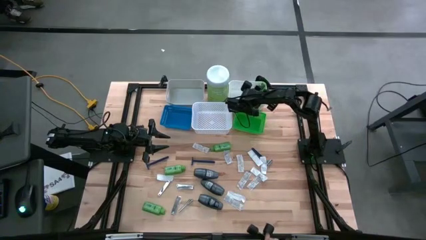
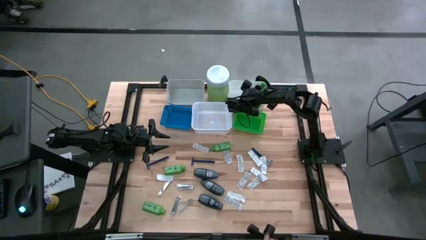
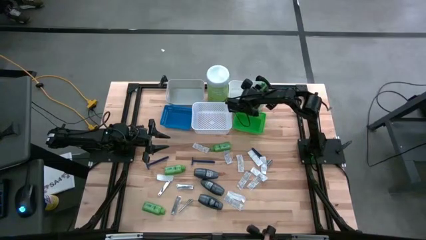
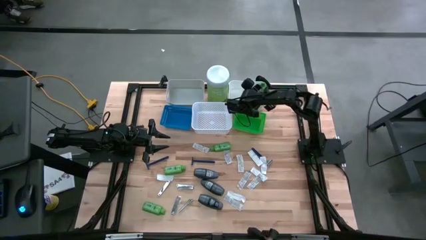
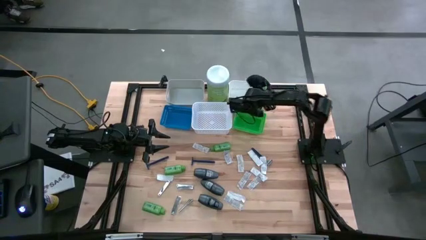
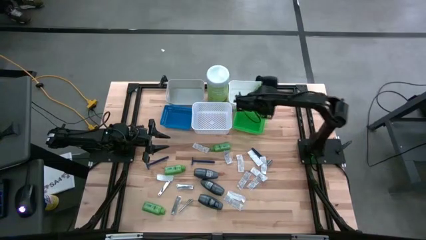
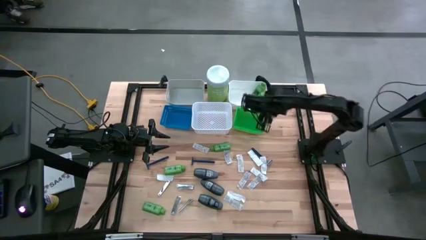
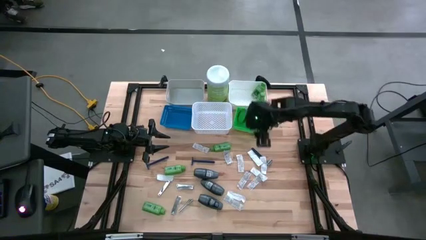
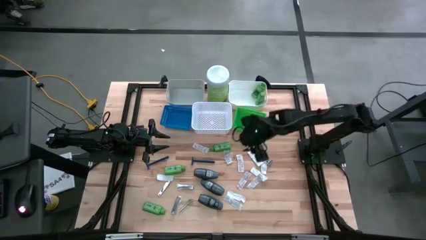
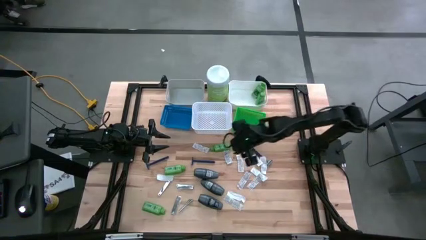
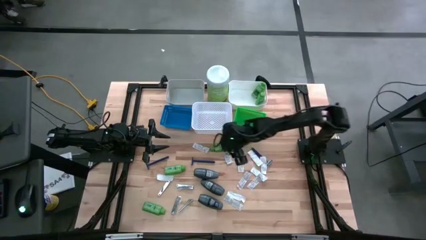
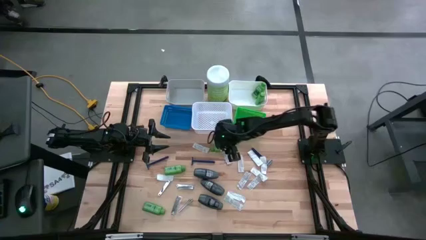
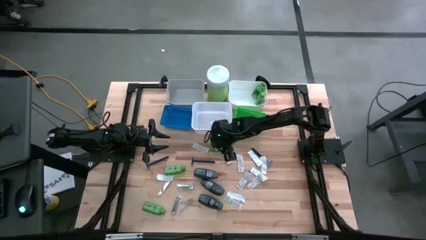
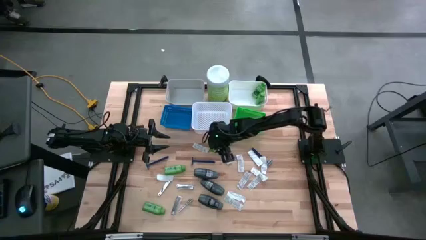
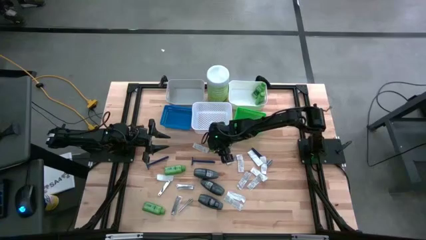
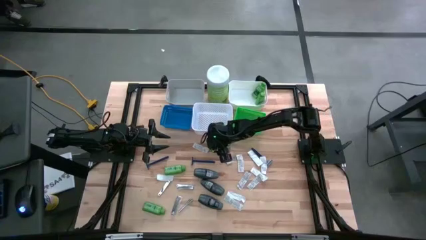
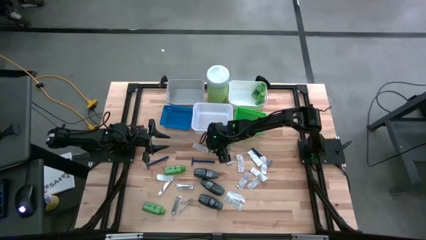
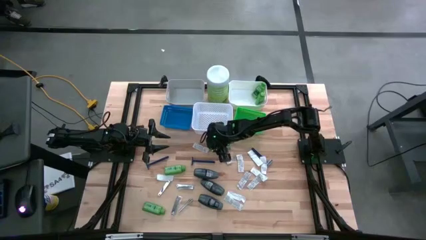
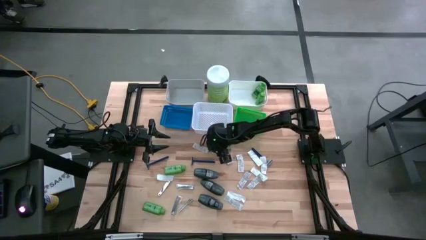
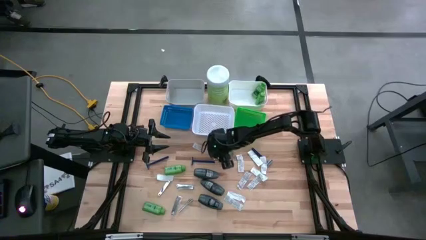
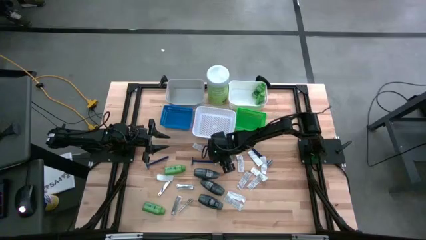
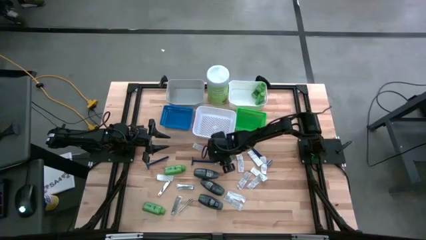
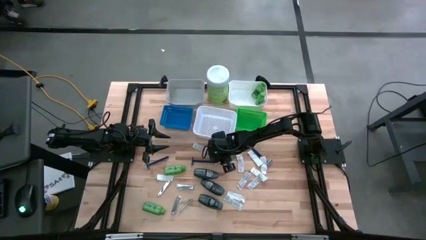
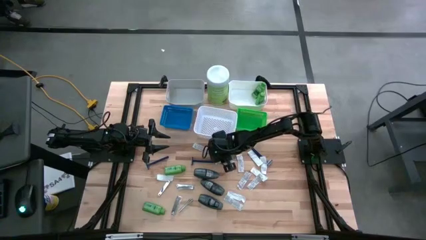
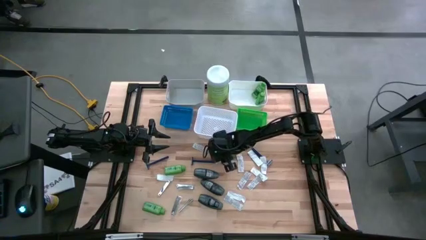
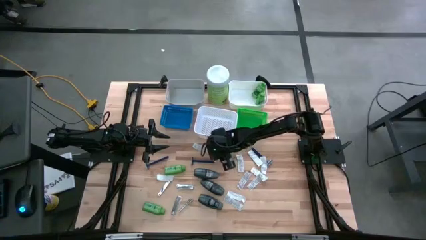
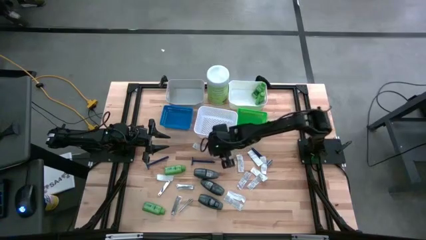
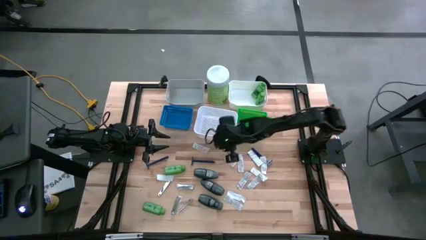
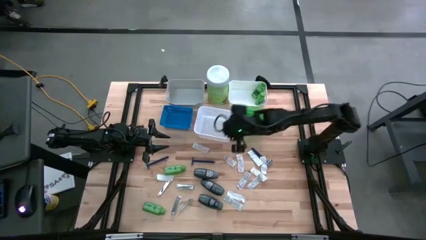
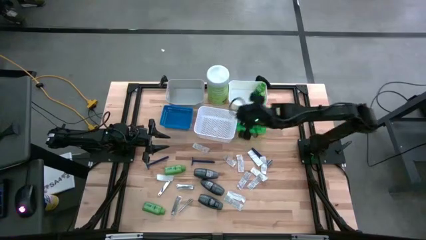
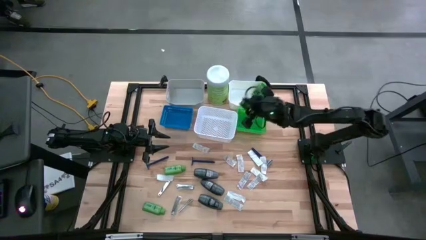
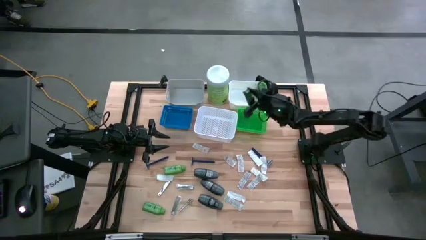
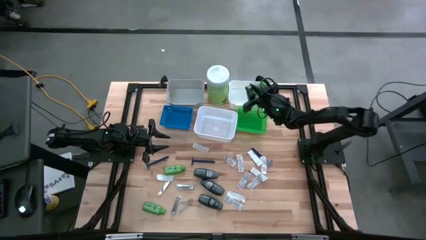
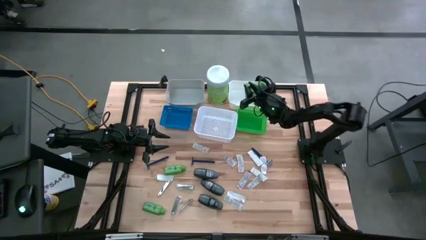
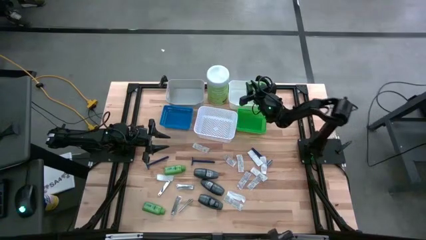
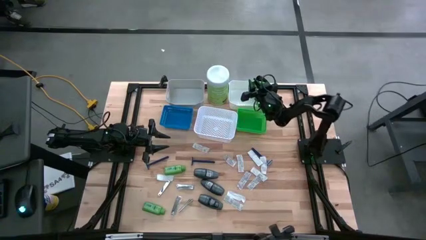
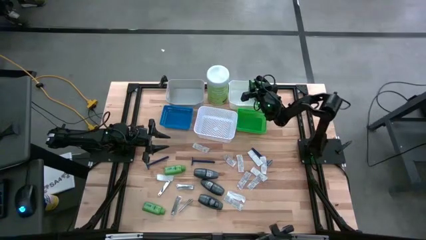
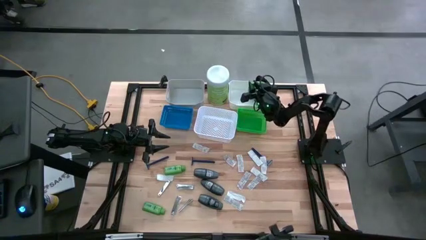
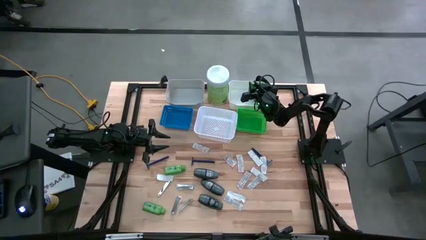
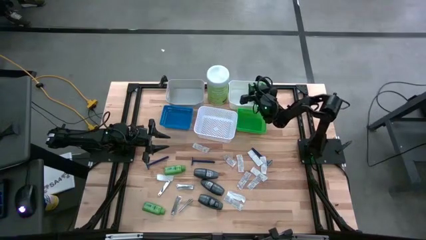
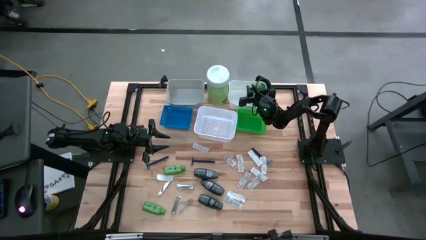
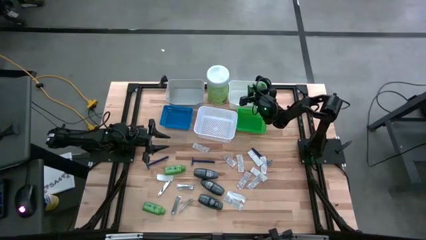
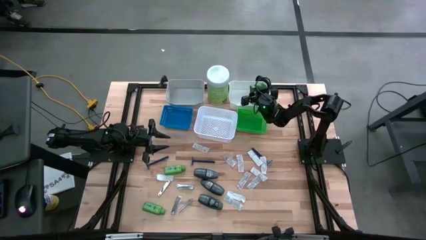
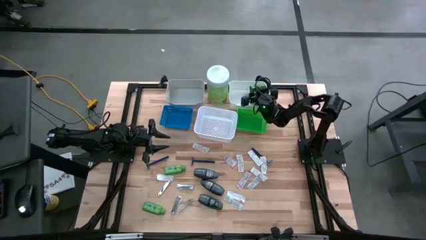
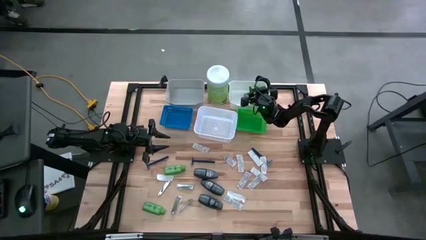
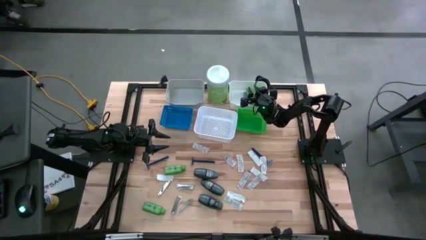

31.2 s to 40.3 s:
Task: Pick & Place Travel size toiletries
Put the green shampoo into the small white bin
